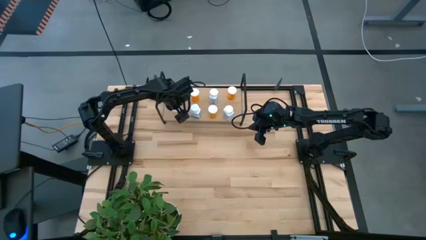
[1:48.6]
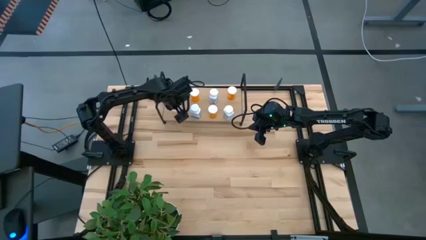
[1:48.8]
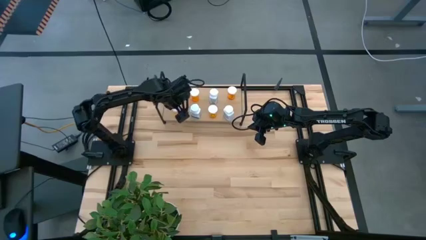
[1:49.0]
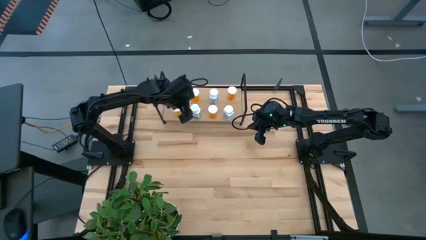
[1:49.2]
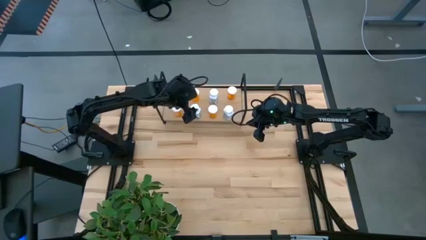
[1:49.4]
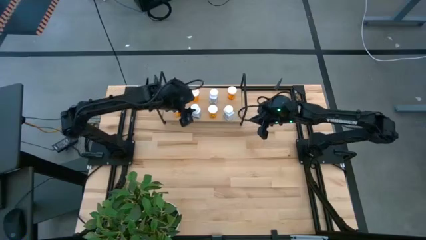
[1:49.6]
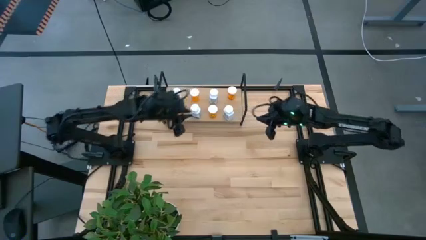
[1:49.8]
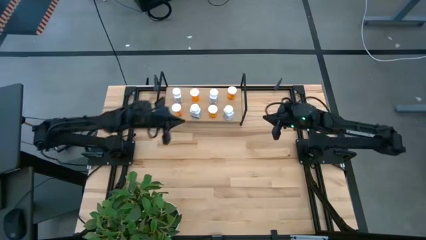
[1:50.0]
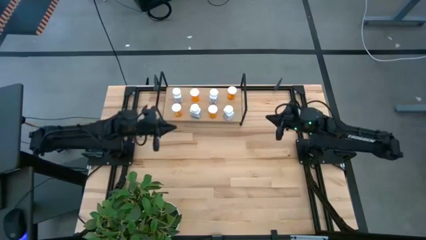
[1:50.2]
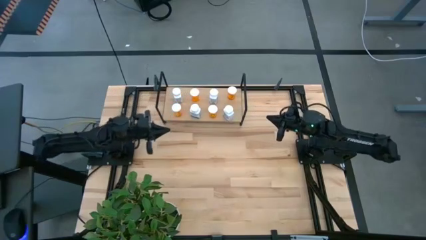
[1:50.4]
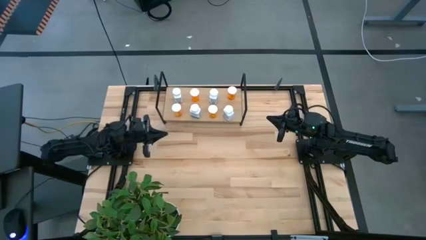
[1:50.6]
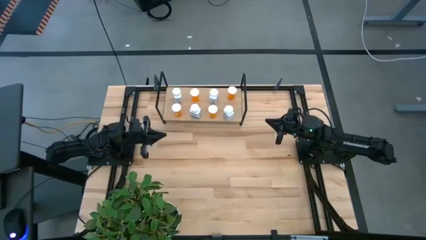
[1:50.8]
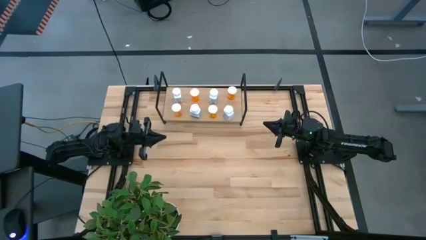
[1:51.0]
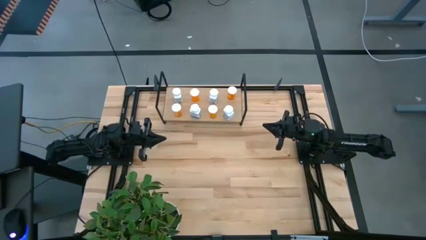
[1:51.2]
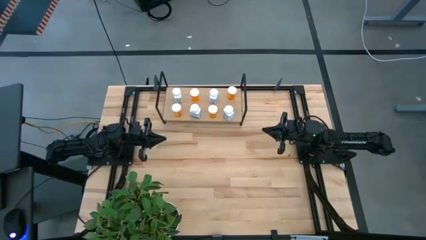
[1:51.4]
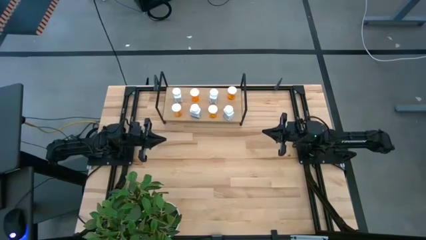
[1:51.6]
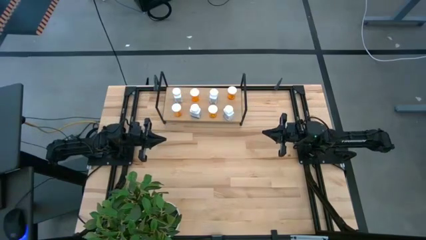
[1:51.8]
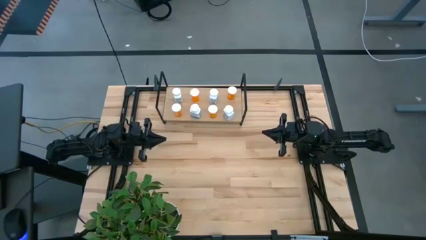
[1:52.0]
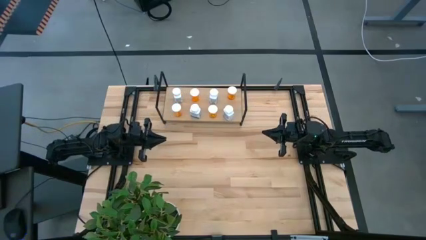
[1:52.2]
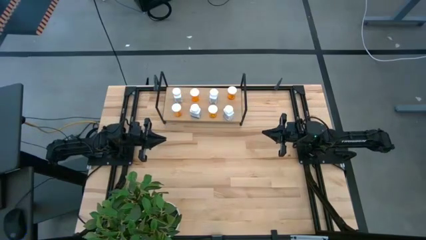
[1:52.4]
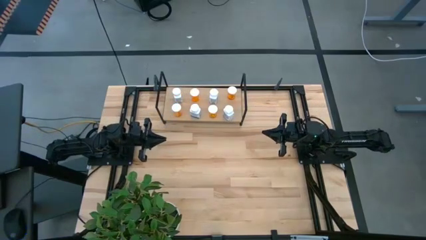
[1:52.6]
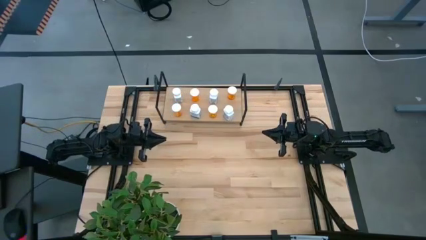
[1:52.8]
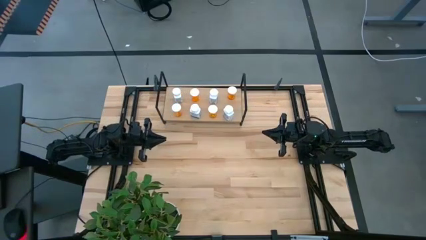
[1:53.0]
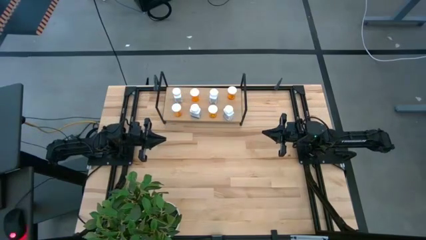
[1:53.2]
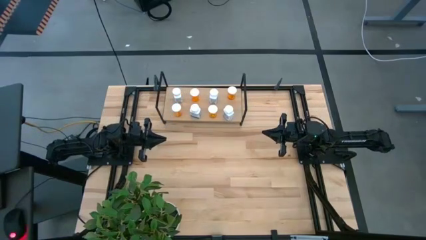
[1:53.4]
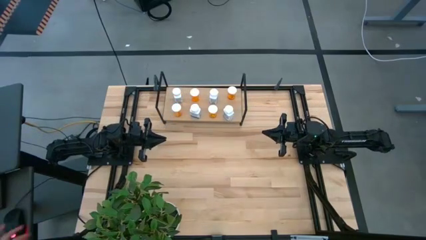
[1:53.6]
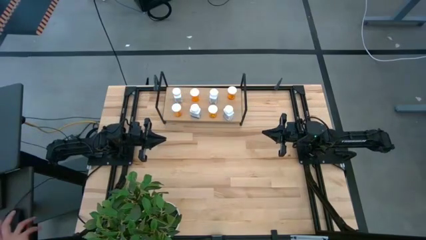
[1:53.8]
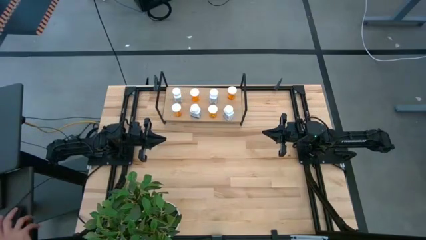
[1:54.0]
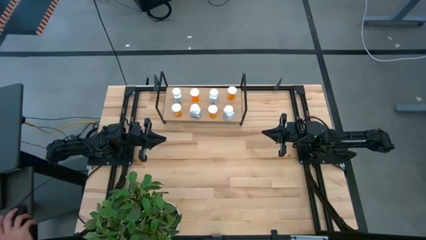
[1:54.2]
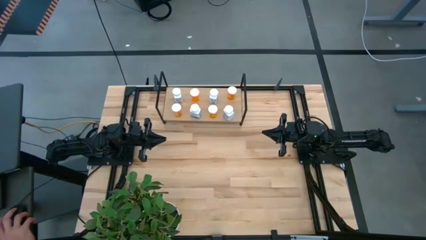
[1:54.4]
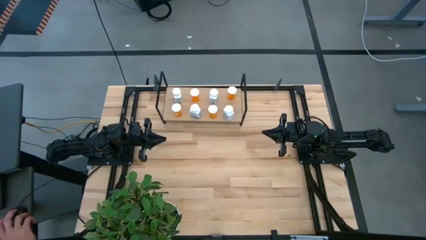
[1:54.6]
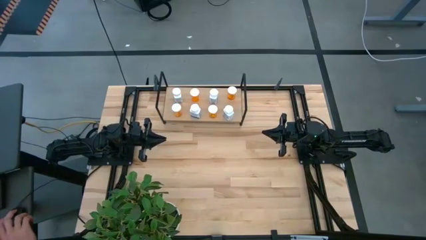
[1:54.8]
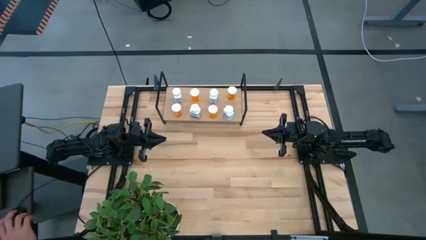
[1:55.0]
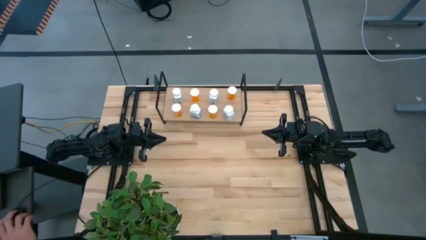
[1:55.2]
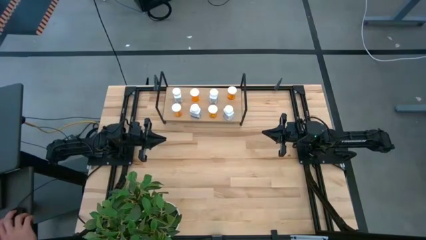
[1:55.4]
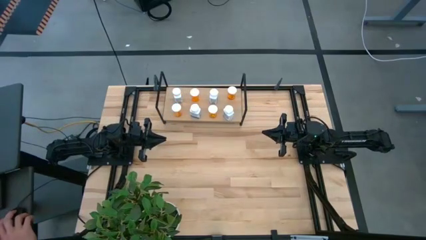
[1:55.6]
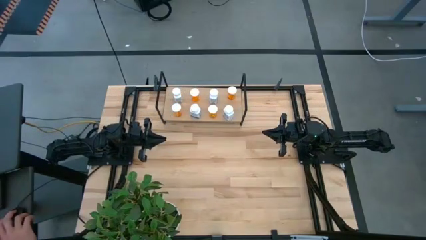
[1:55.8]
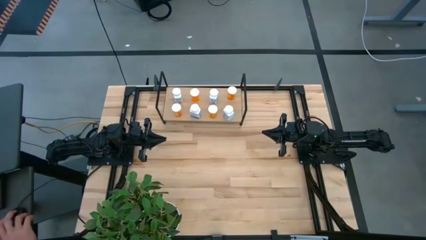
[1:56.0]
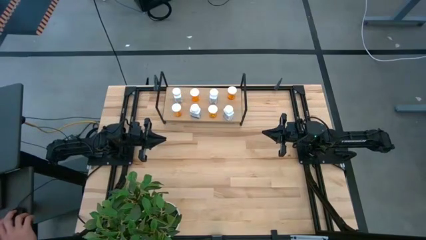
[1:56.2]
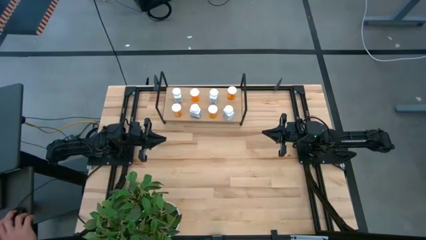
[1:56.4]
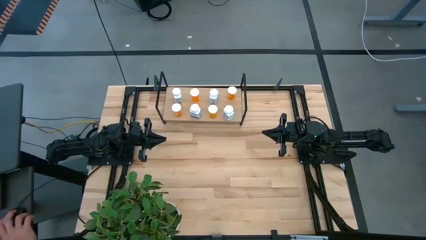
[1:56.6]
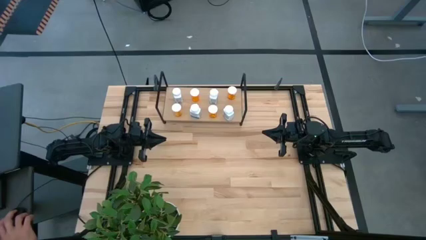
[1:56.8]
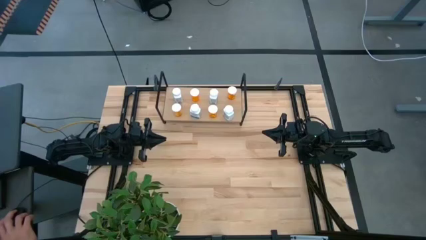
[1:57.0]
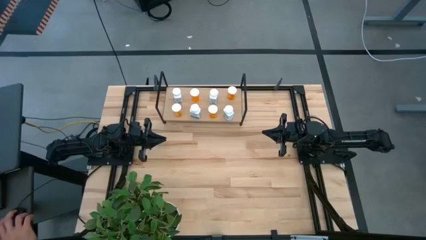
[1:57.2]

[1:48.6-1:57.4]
Task: Pick and place medicine bottles onto shelf by color
Return to Home Position

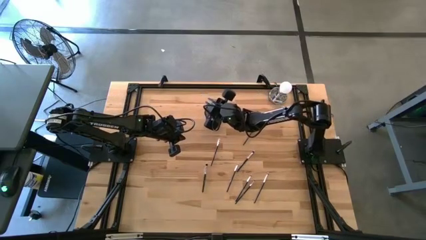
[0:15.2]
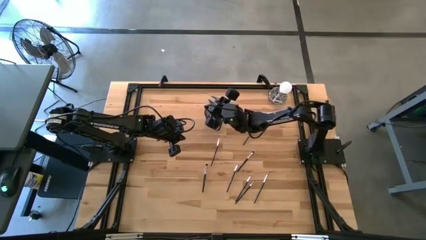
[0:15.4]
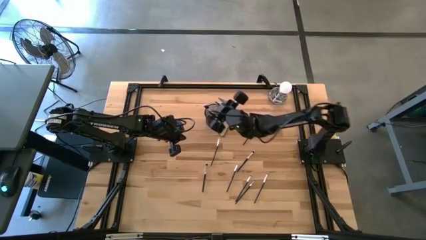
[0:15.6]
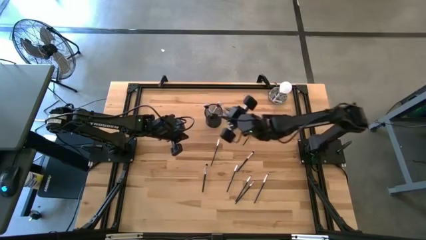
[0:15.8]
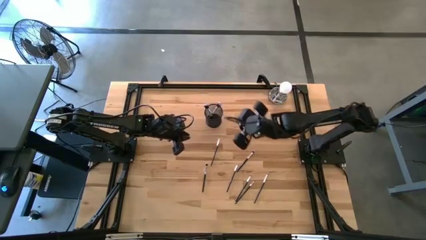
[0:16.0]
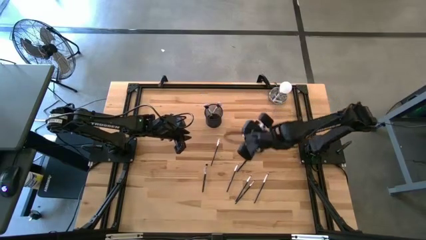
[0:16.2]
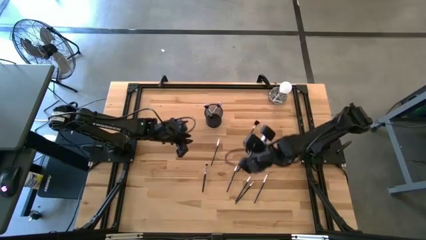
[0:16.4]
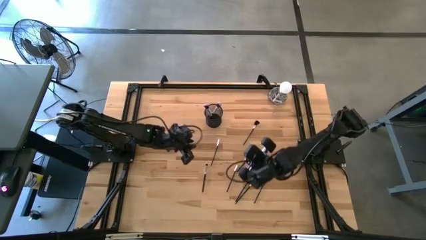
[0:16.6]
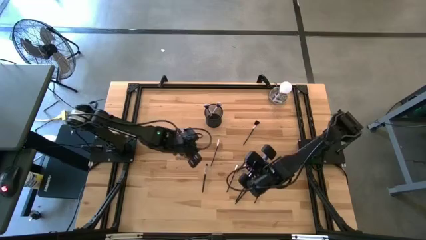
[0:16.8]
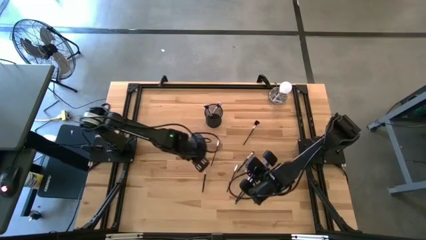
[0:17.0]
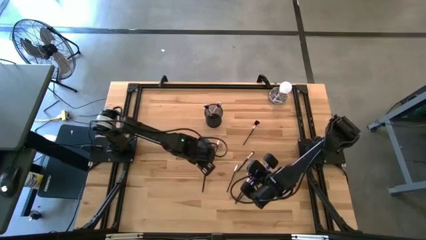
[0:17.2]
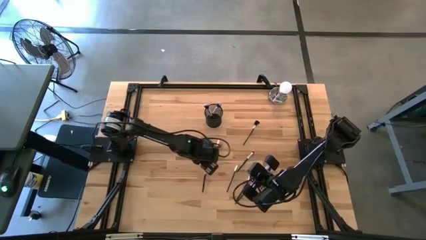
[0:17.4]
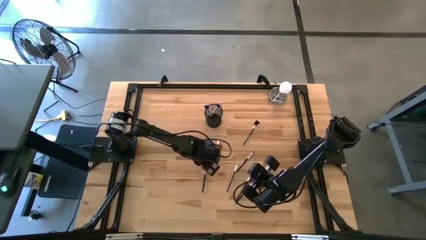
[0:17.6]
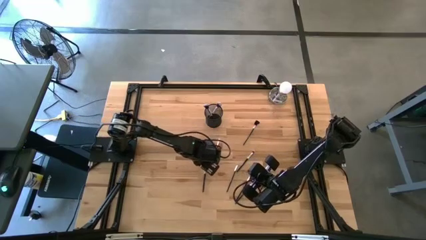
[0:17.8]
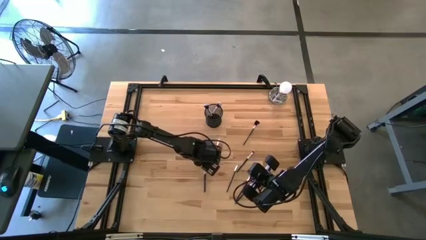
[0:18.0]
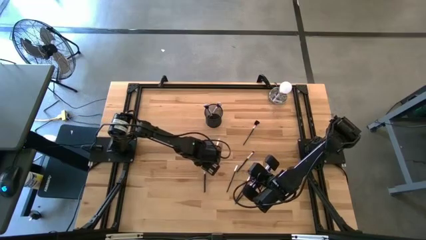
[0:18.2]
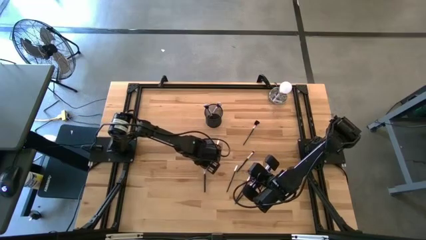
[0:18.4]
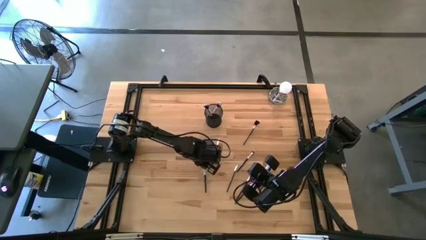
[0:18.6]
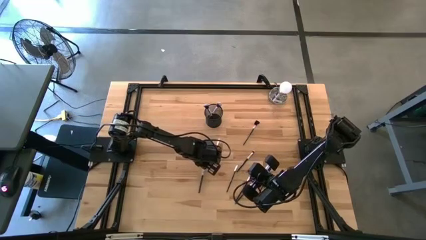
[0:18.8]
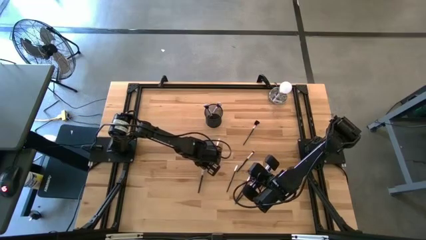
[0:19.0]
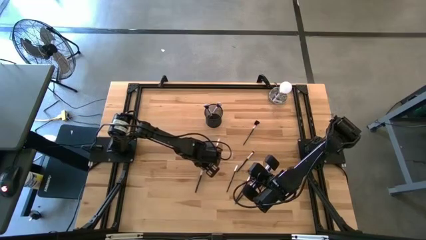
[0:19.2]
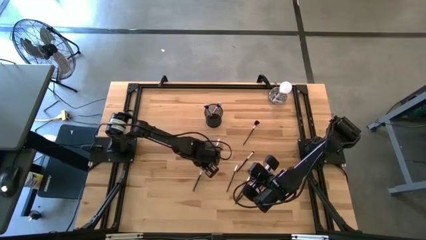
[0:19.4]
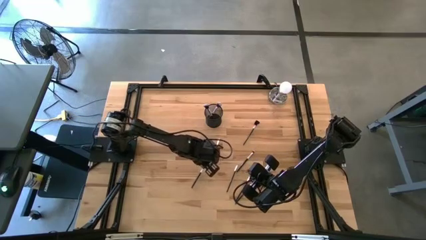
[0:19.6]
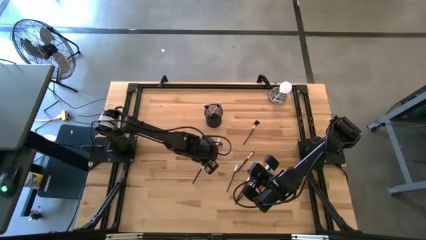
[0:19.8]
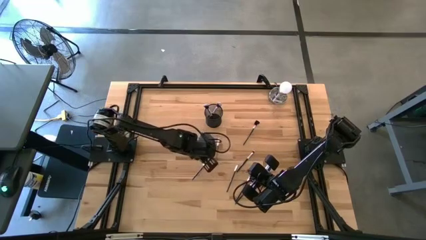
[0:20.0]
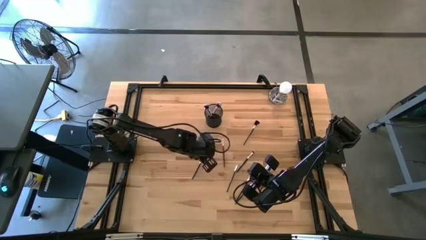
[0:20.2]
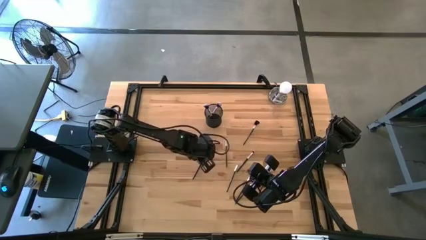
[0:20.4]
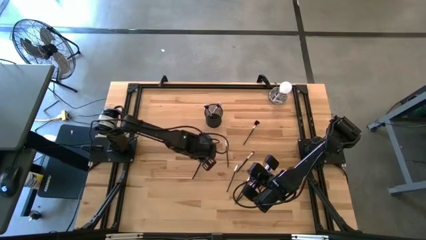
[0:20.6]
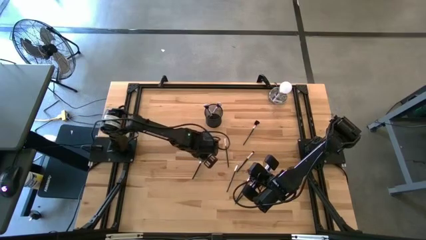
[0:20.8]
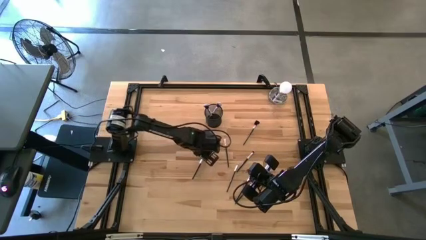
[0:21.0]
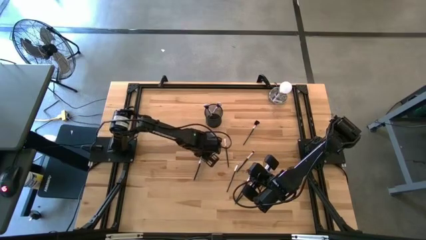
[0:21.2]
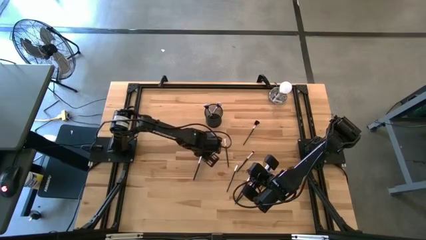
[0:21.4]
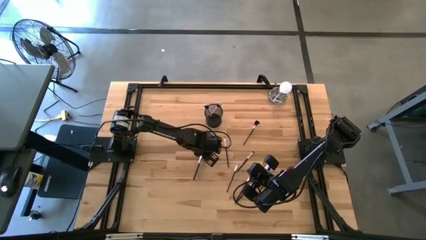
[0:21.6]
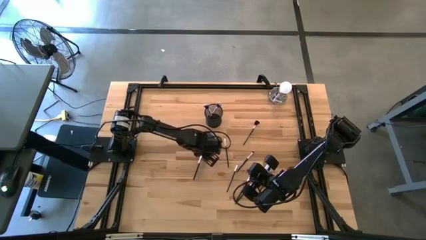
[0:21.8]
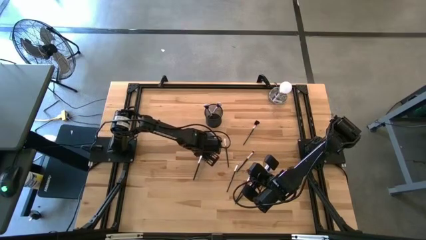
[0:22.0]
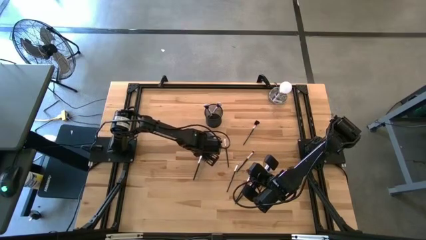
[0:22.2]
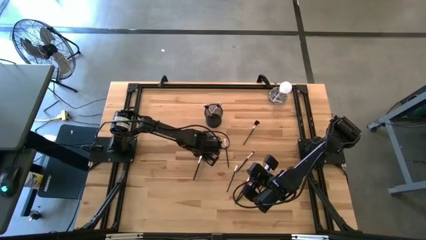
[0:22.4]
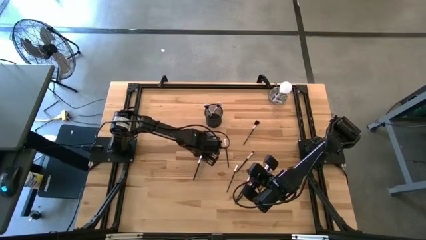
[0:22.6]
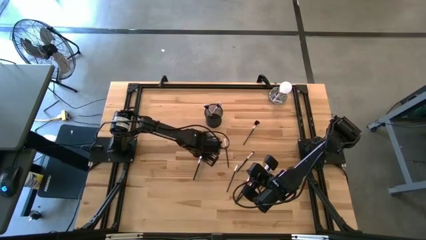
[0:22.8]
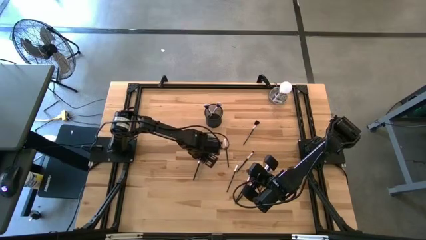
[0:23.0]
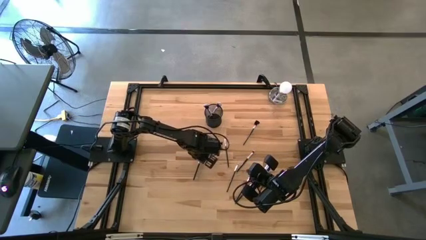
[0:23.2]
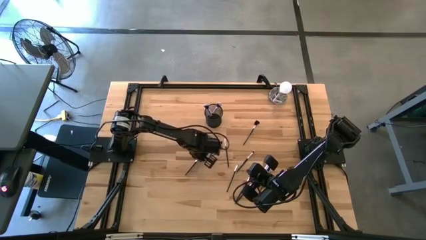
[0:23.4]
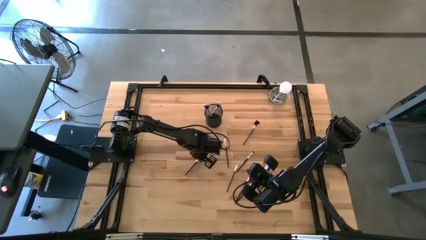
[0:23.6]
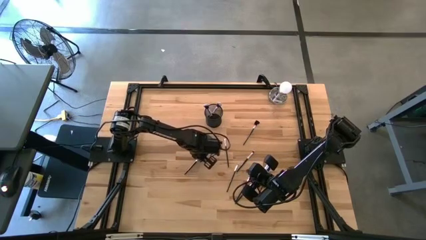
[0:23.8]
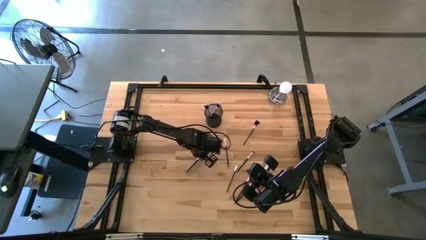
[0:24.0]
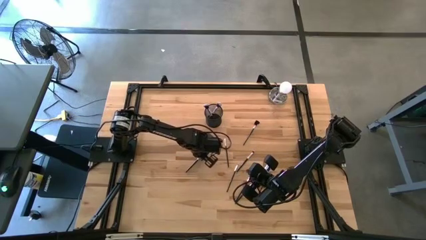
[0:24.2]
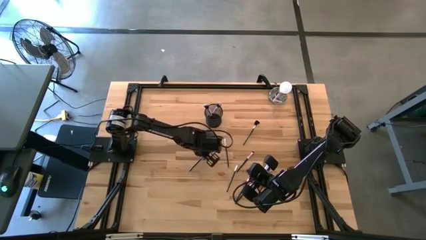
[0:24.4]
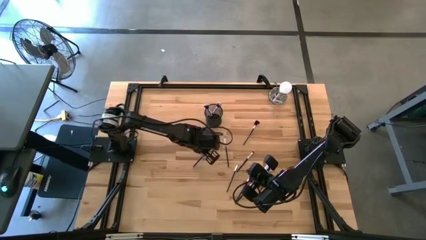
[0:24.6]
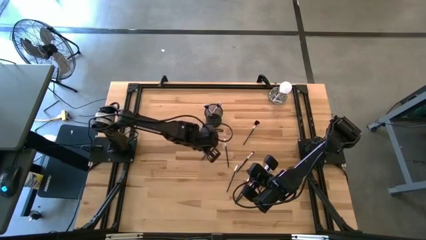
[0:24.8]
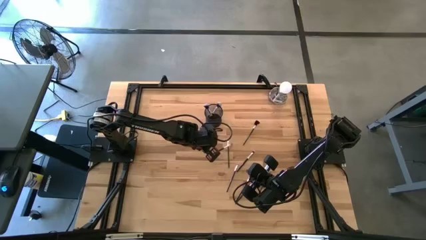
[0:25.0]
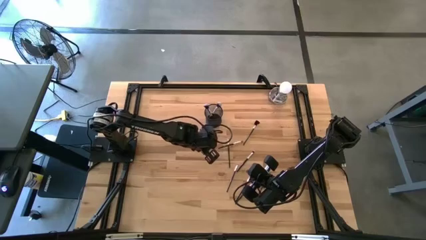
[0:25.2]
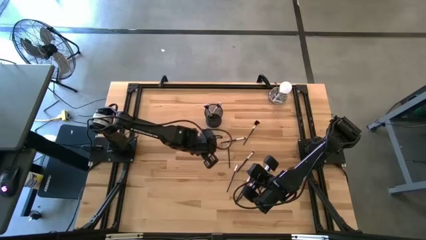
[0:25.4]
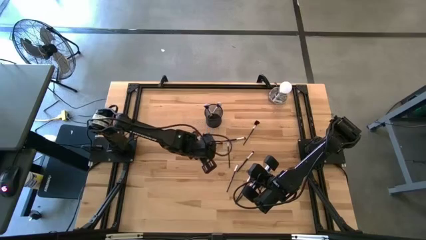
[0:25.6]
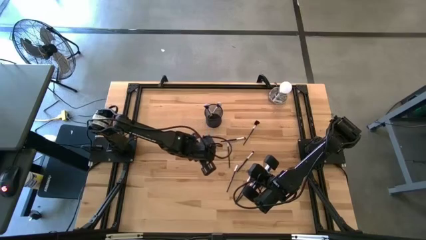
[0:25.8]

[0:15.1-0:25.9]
Task: Pick & Place Makeup Brushes
Put the small white make-up brush into the black container
